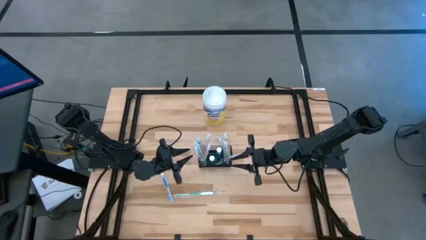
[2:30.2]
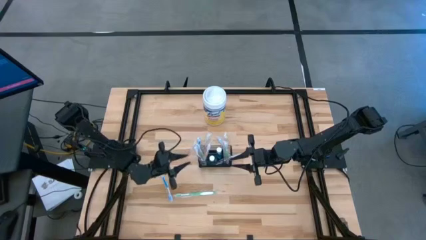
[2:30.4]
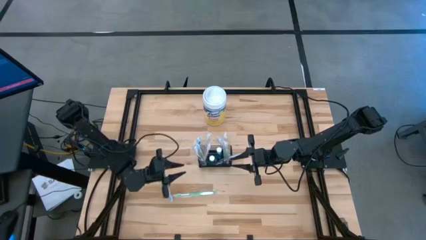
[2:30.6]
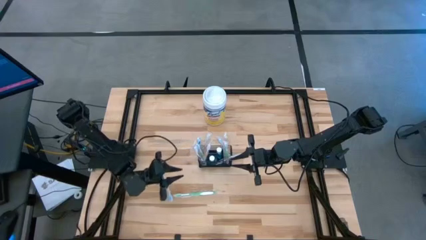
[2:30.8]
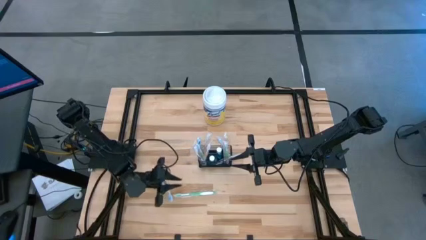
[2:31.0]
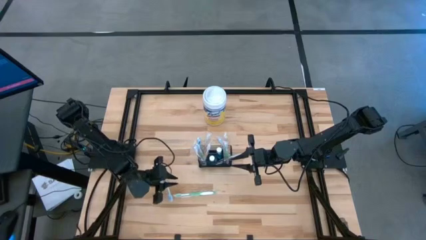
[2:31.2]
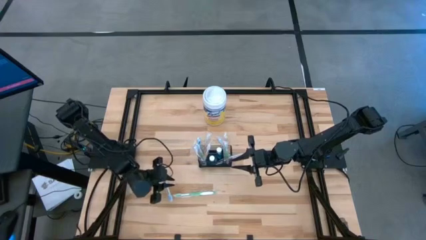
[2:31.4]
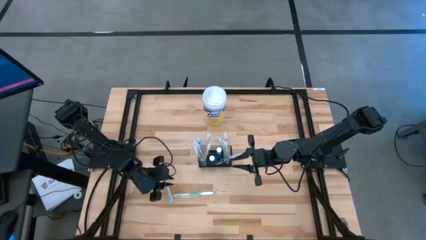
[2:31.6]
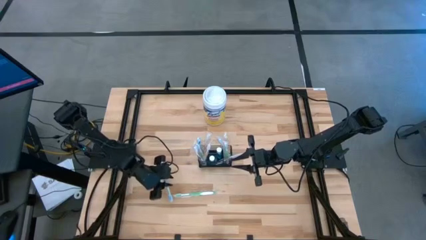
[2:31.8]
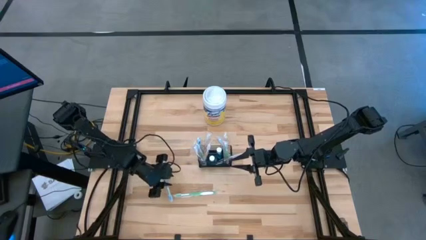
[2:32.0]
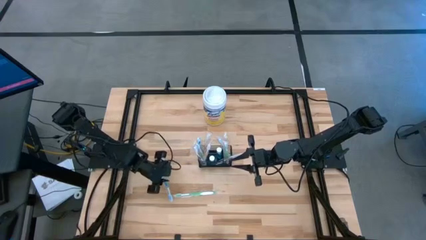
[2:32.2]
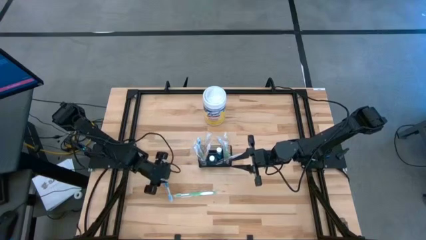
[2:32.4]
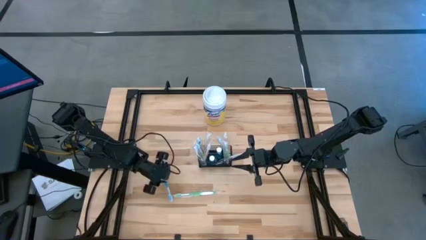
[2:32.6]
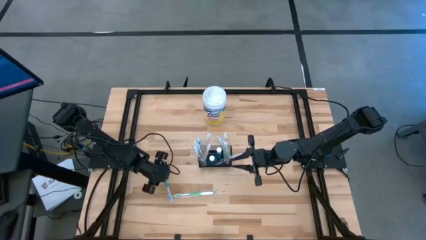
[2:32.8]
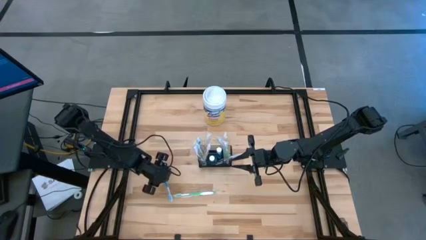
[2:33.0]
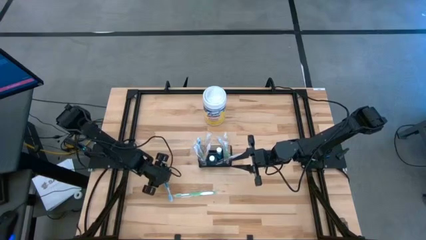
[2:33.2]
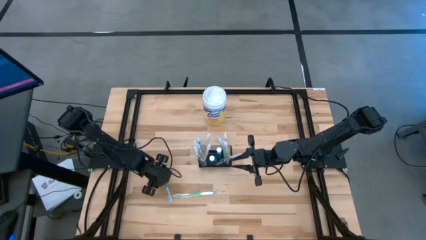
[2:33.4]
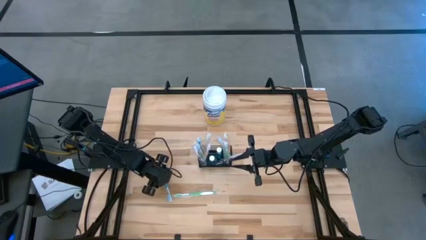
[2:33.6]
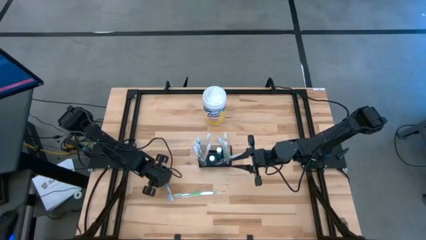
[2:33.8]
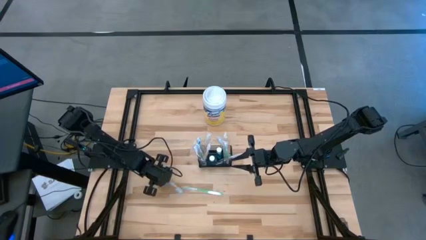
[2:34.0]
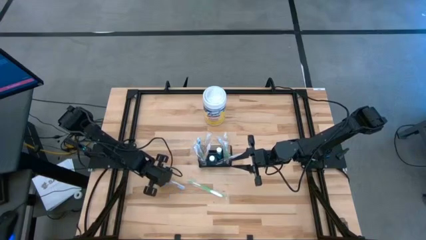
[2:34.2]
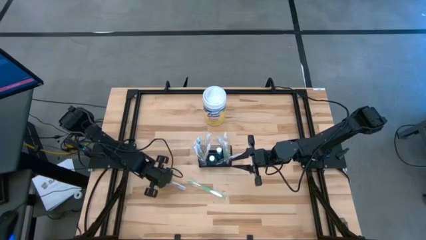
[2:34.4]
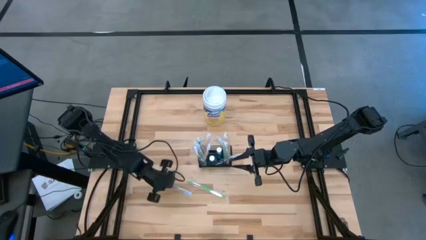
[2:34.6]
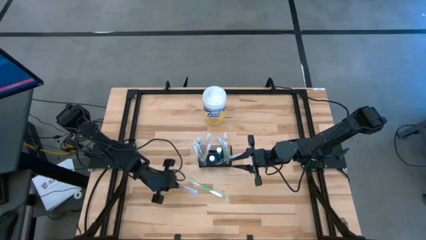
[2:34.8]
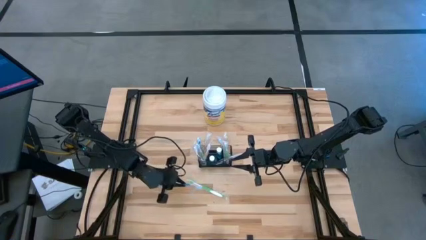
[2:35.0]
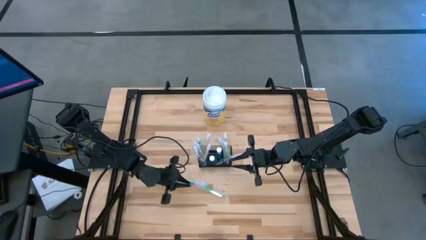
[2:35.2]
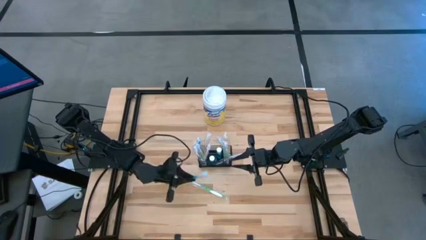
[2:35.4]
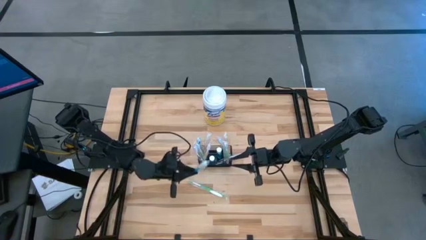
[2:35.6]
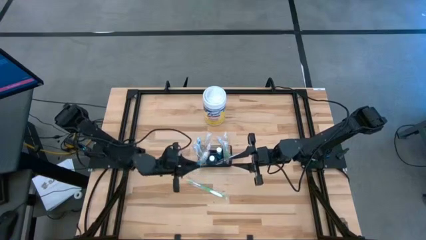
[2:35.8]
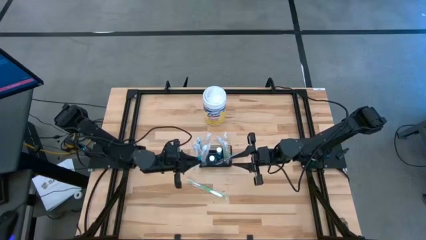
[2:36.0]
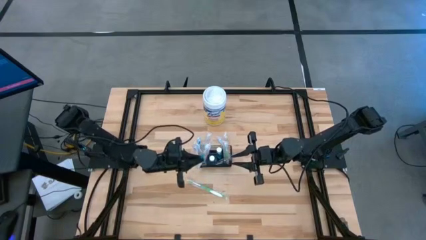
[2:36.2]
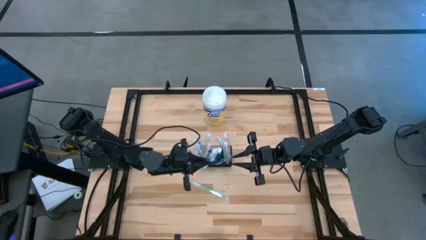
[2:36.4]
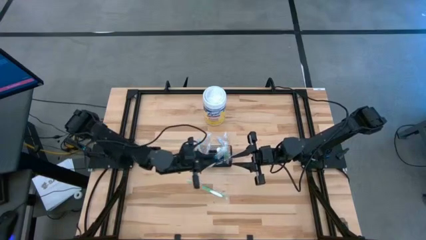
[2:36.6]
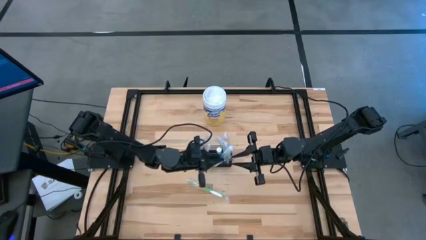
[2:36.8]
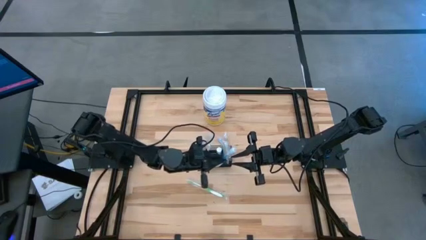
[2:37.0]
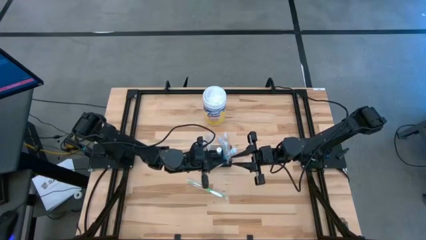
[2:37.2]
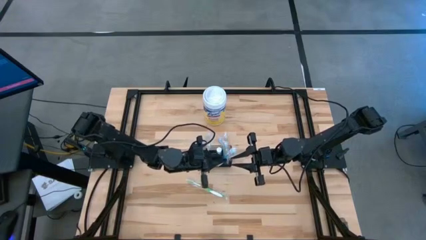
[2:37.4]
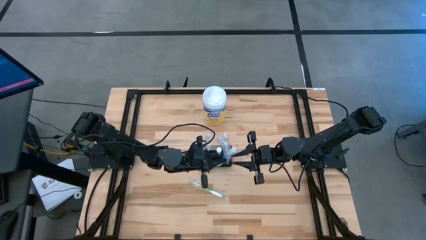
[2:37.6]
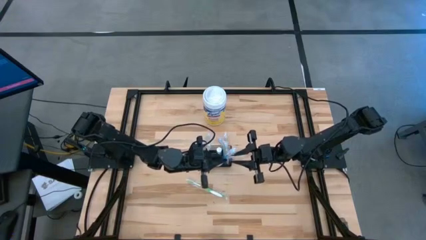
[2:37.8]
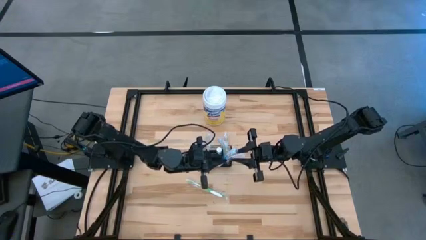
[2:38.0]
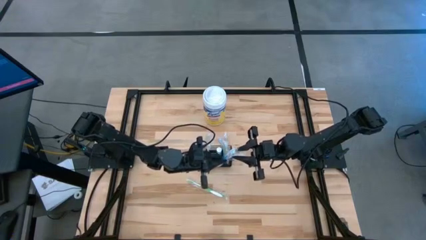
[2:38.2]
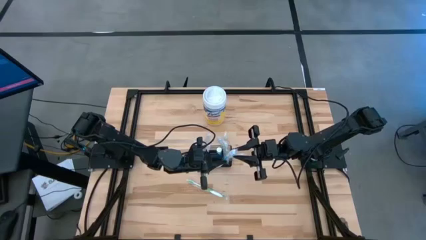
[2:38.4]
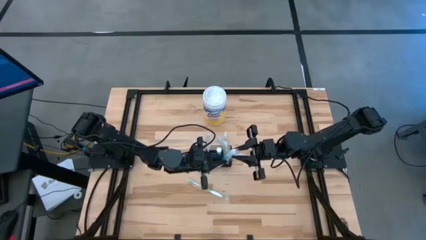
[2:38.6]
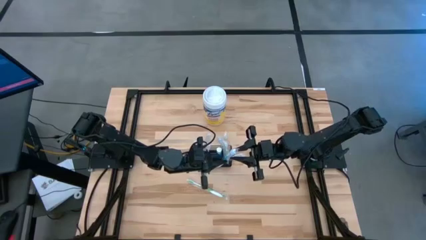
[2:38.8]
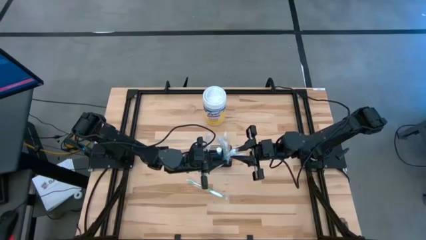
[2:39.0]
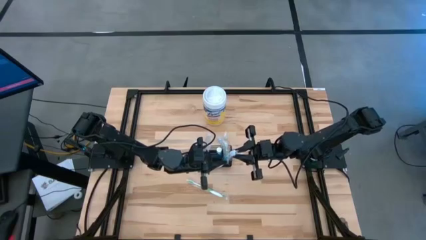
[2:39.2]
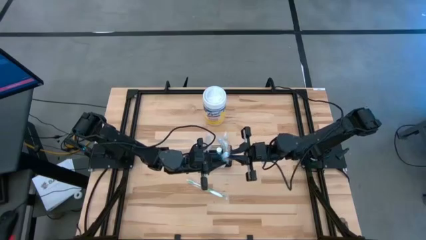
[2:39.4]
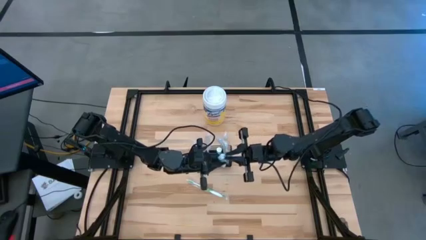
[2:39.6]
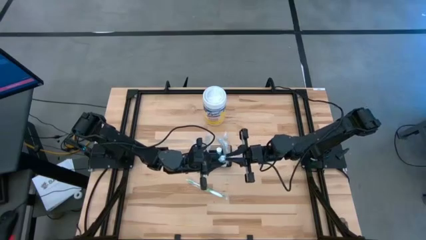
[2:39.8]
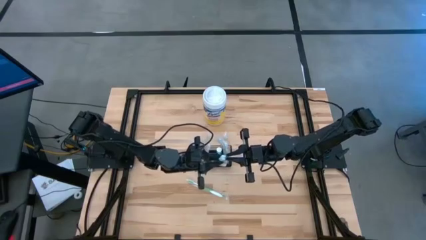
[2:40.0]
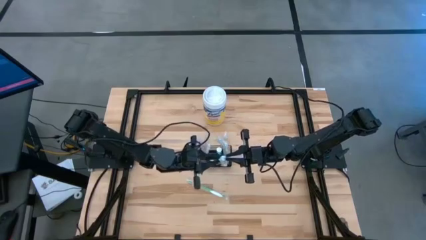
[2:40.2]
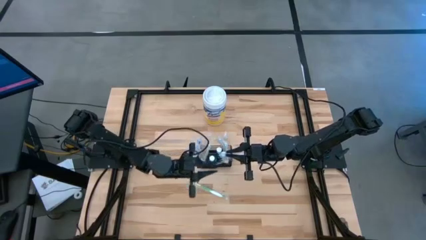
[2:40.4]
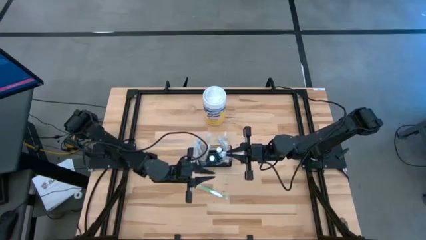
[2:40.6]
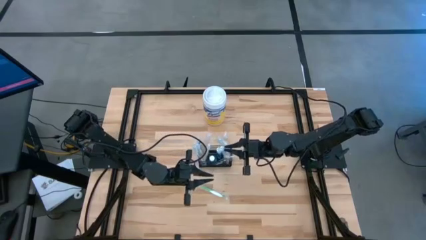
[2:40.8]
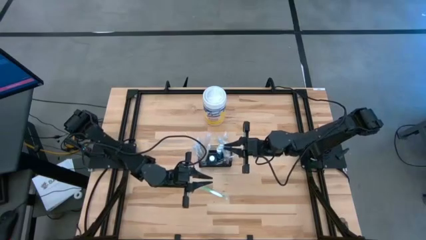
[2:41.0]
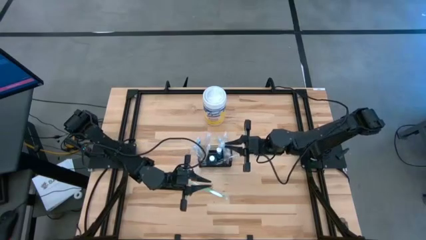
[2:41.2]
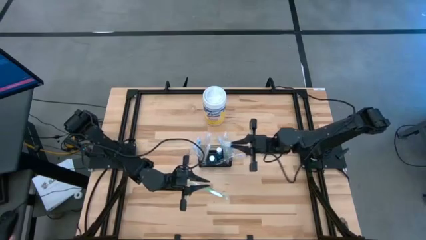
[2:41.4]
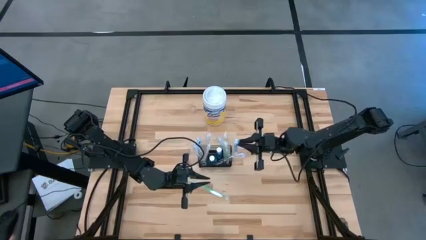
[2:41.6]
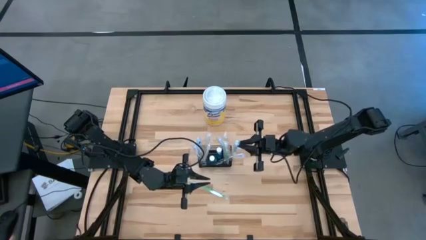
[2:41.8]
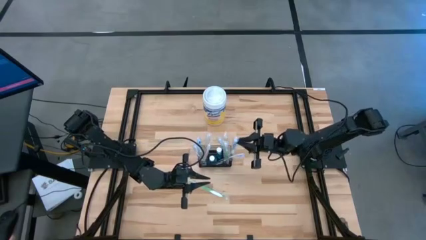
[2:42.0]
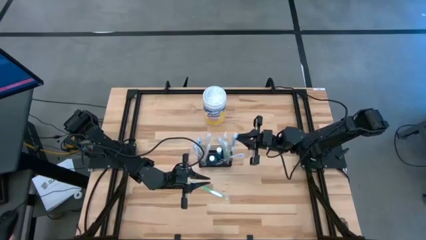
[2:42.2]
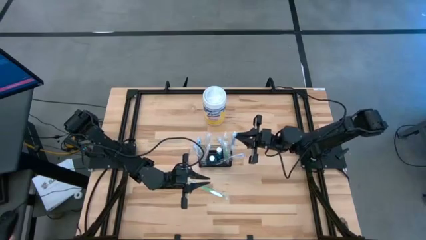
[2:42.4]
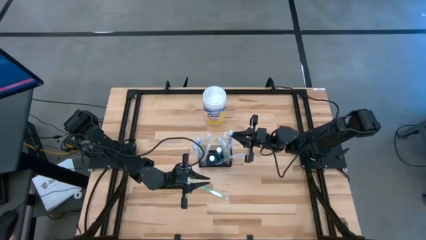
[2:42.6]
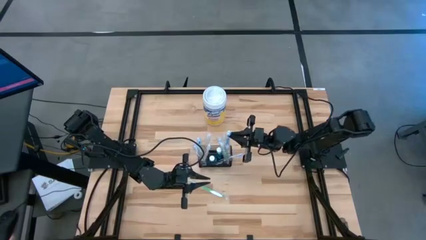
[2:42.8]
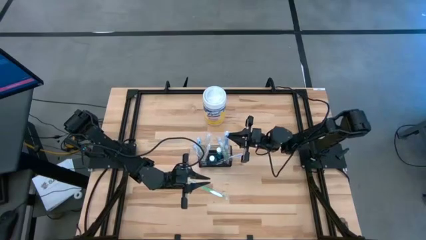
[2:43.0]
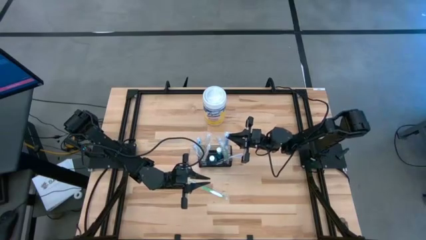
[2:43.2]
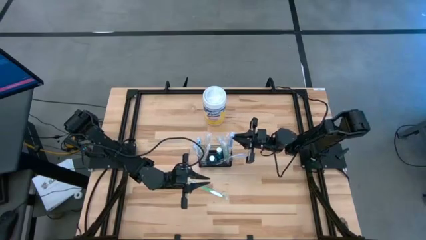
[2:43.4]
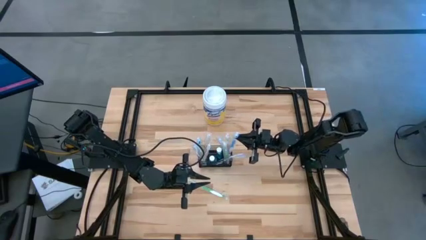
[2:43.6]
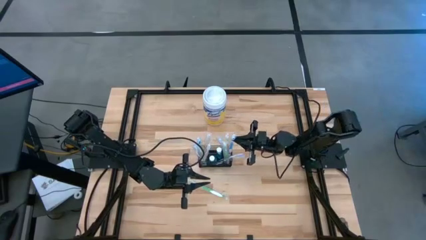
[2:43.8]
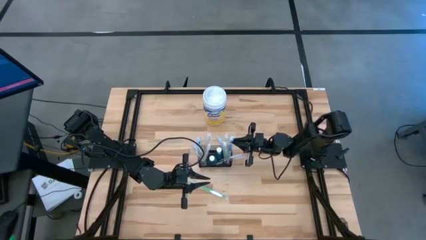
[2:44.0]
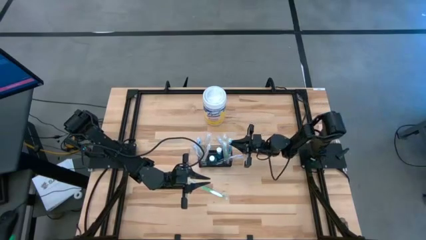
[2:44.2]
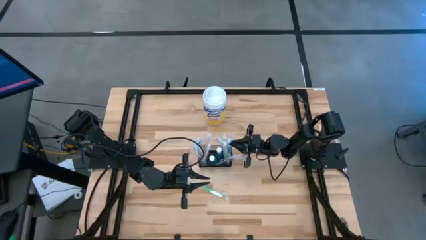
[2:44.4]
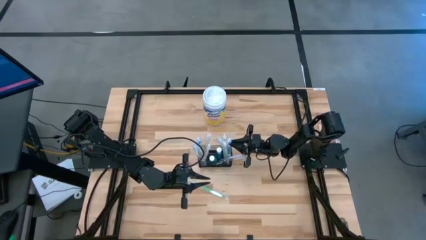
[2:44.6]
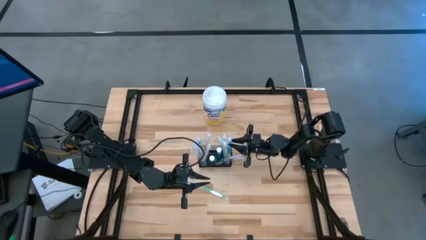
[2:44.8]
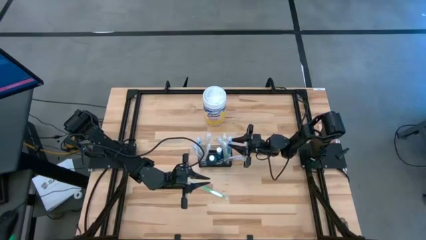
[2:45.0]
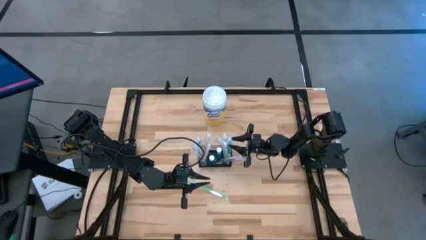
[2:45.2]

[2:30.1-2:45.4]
Task: Pick & Place toothbrushing station
Put the blue toothbrush into the mesh organizer

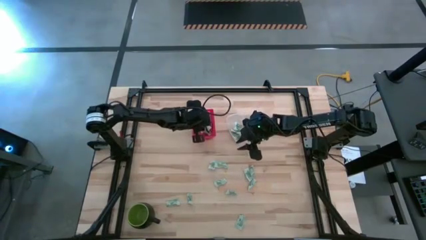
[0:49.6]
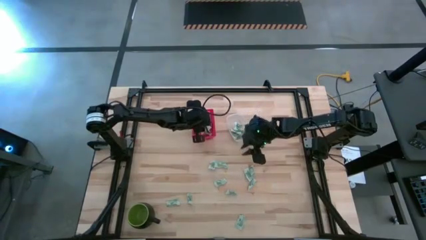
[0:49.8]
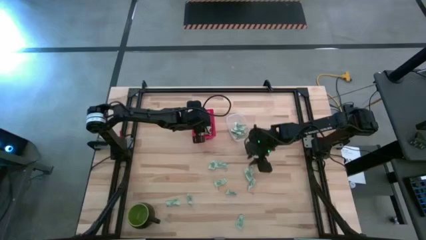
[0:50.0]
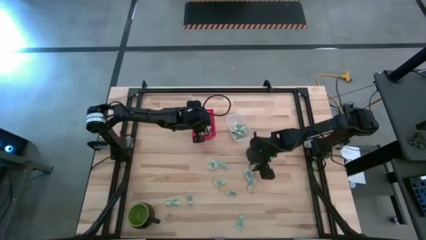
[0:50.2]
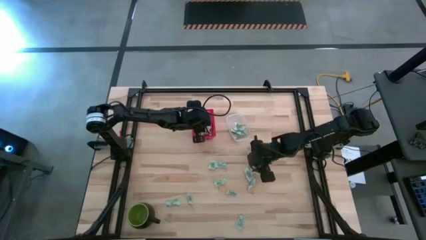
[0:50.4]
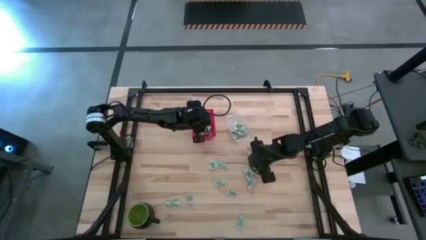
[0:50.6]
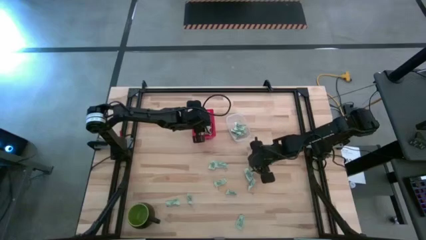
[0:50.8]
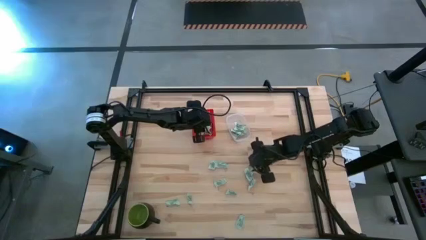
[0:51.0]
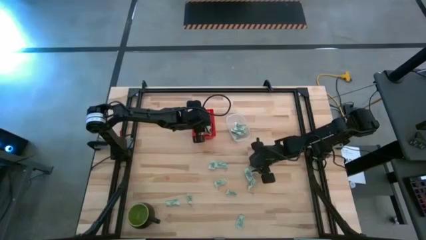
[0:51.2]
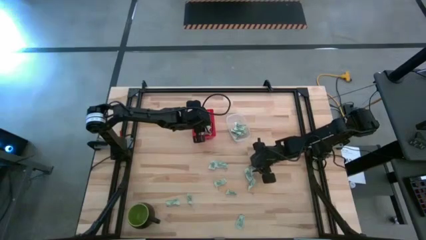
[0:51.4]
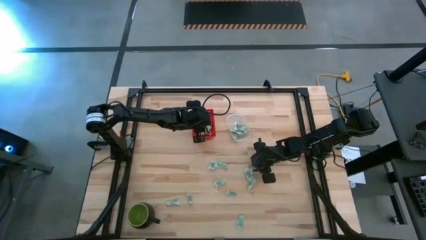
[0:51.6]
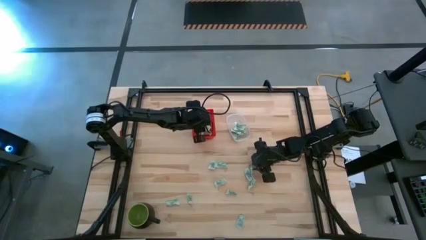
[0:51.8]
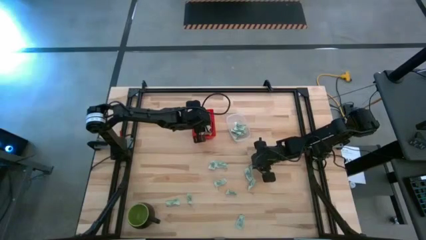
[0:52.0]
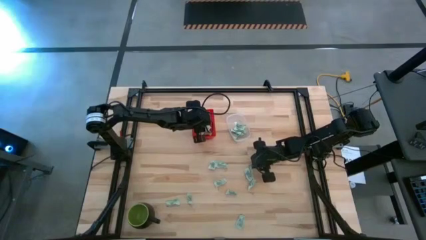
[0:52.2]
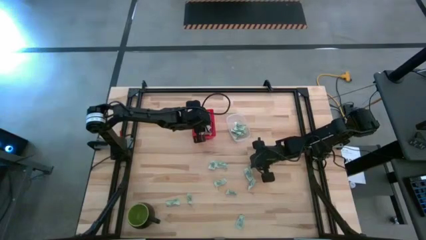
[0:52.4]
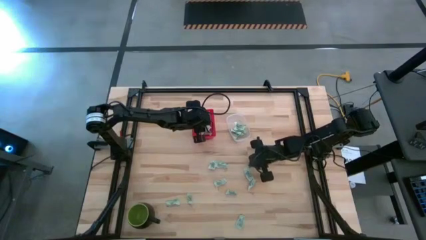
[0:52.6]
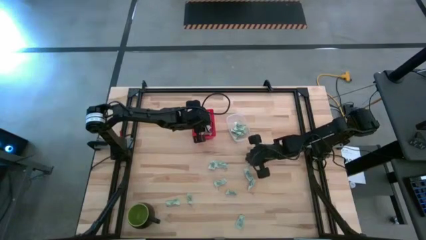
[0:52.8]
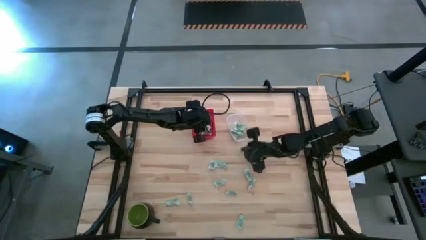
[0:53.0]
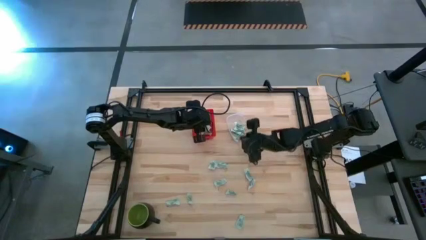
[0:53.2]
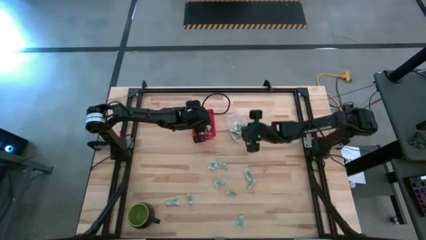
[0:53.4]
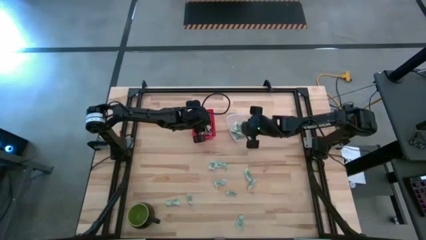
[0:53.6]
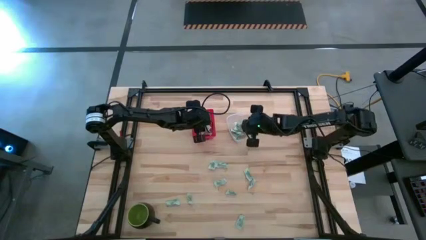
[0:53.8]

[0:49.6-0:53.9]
Task: Pick and place items into bin
Put the white stevia packet into the transparent bin
